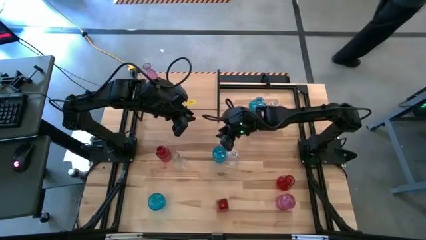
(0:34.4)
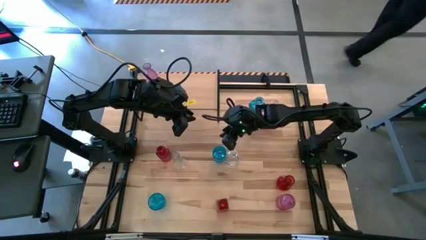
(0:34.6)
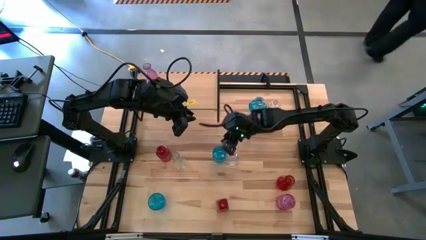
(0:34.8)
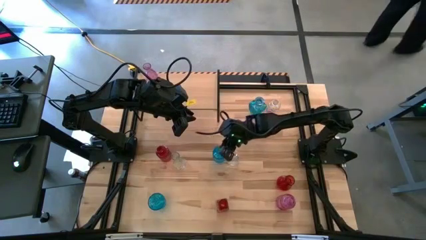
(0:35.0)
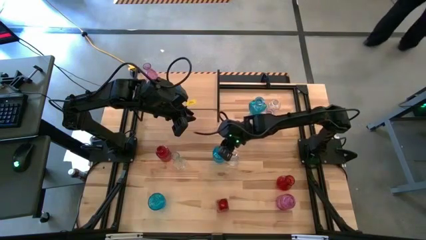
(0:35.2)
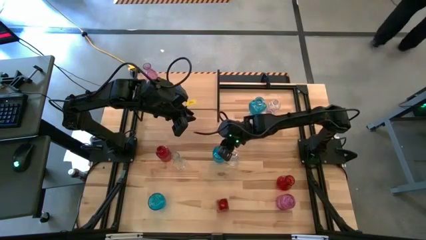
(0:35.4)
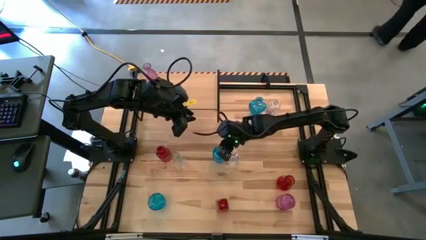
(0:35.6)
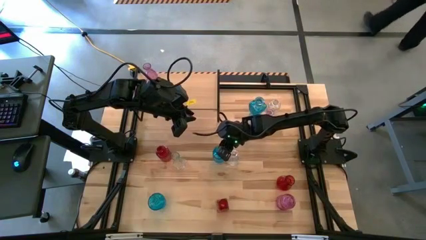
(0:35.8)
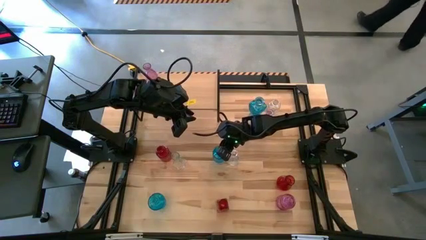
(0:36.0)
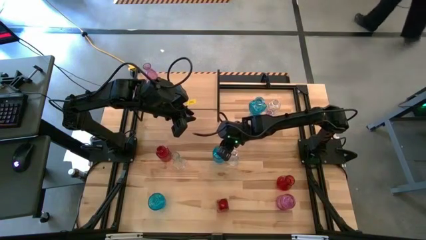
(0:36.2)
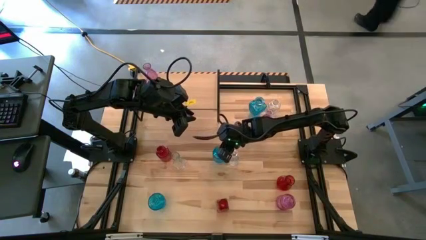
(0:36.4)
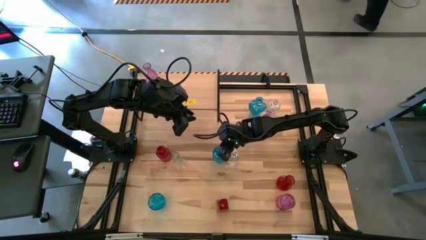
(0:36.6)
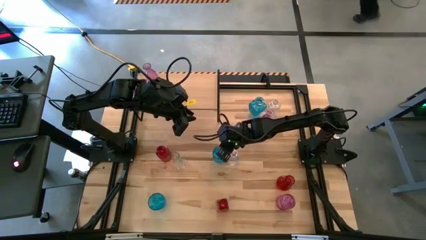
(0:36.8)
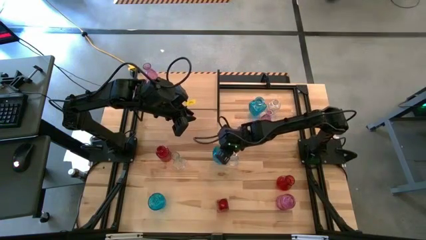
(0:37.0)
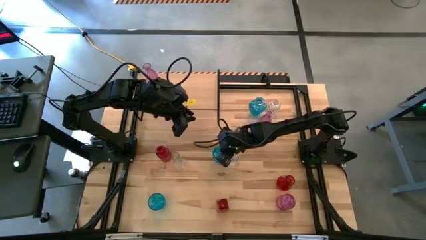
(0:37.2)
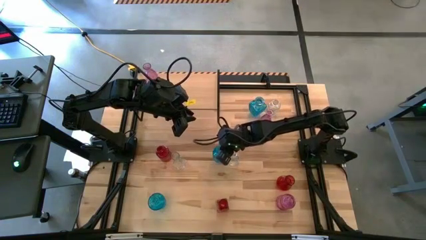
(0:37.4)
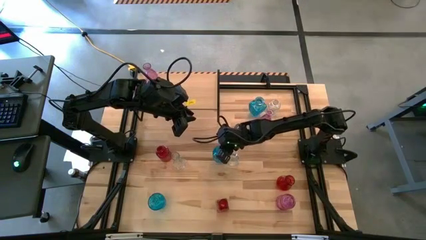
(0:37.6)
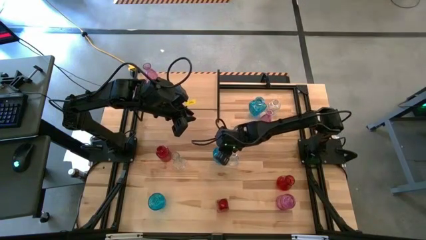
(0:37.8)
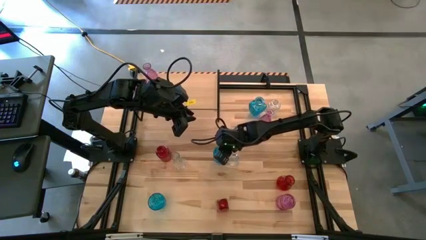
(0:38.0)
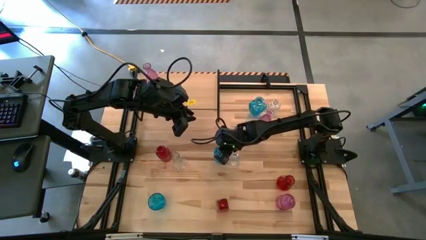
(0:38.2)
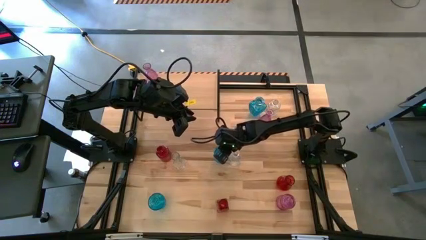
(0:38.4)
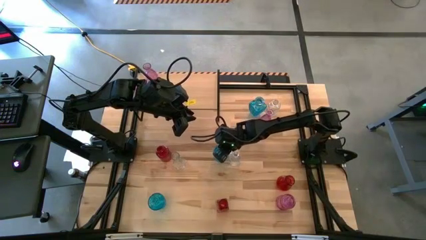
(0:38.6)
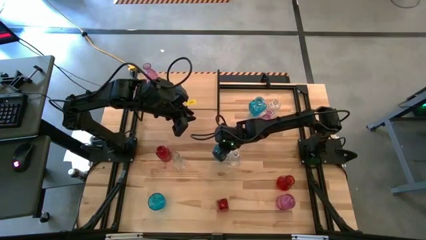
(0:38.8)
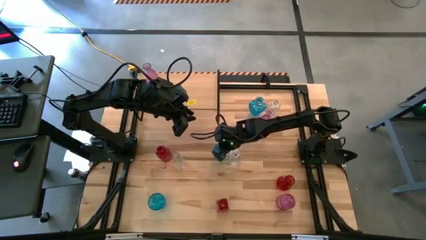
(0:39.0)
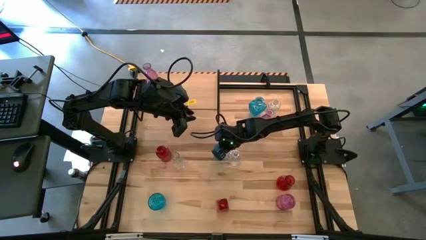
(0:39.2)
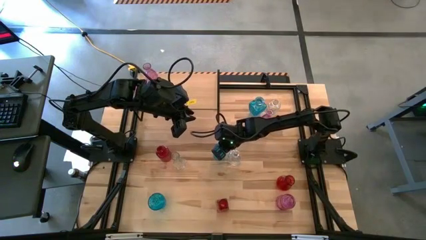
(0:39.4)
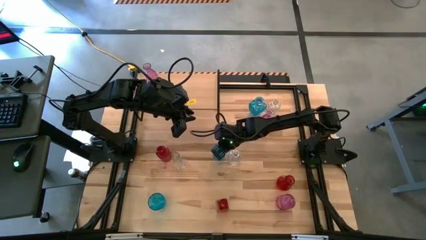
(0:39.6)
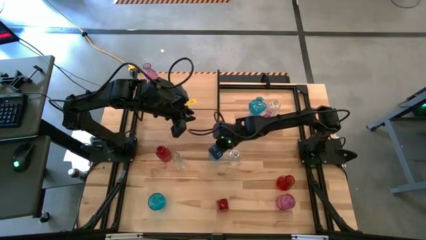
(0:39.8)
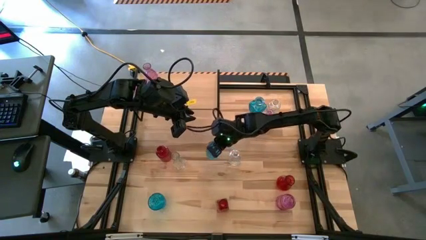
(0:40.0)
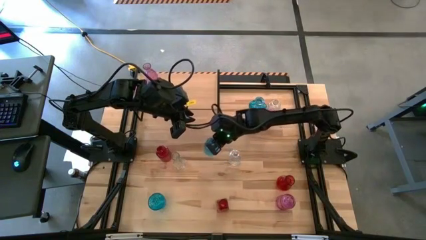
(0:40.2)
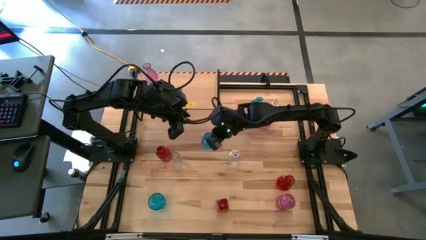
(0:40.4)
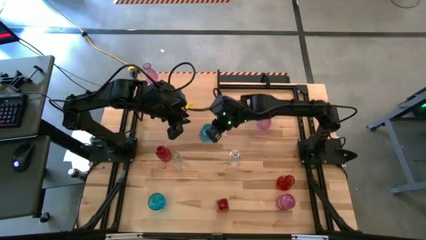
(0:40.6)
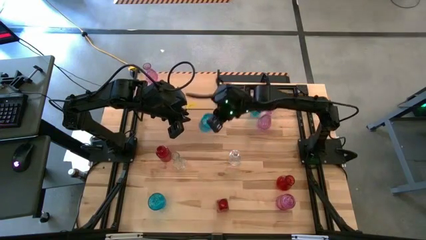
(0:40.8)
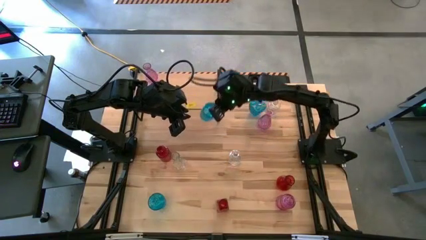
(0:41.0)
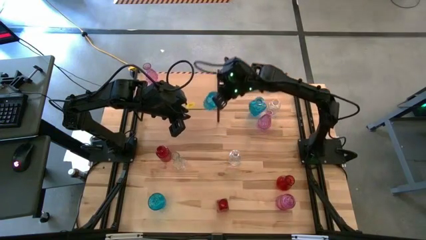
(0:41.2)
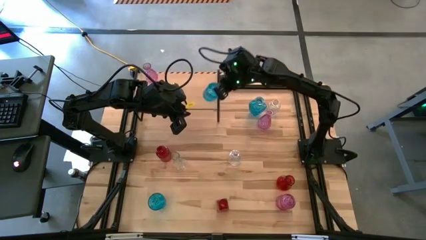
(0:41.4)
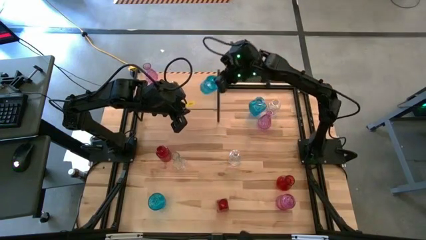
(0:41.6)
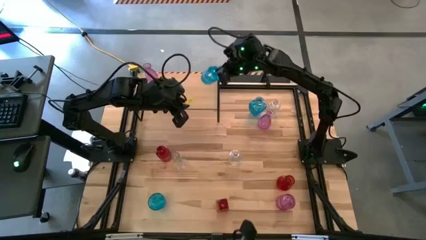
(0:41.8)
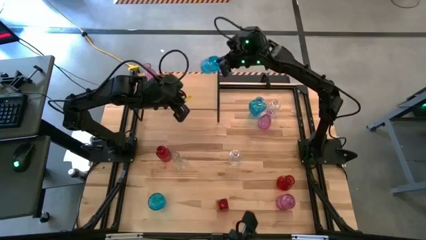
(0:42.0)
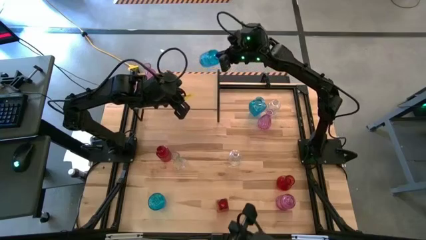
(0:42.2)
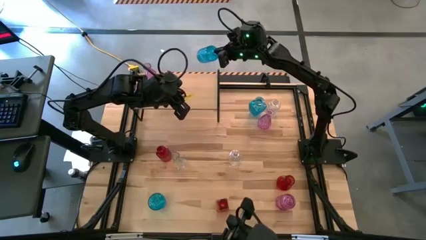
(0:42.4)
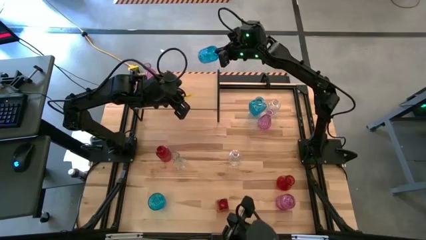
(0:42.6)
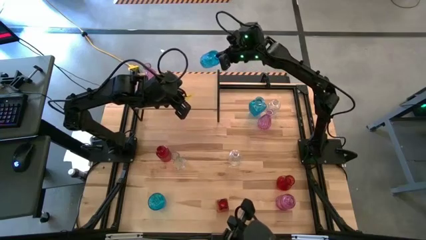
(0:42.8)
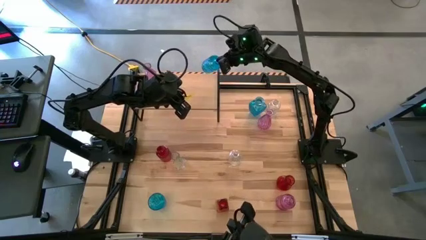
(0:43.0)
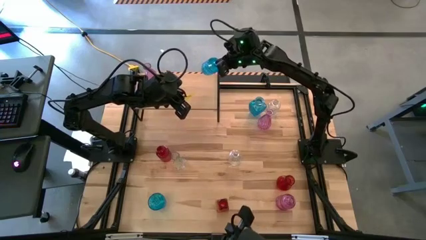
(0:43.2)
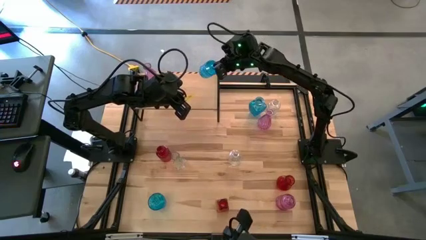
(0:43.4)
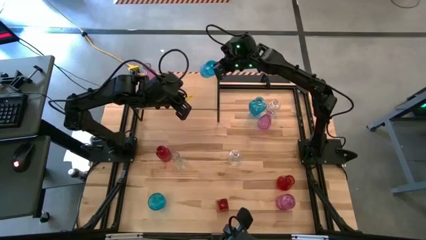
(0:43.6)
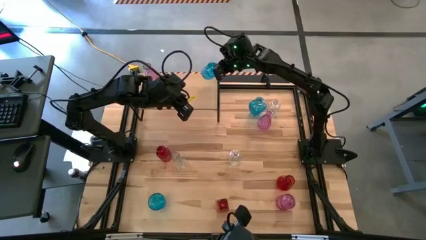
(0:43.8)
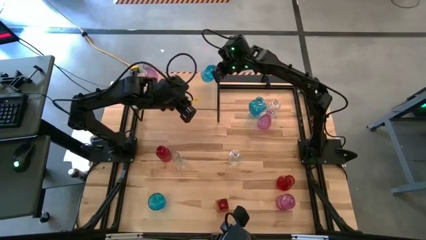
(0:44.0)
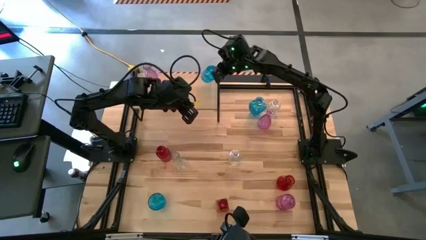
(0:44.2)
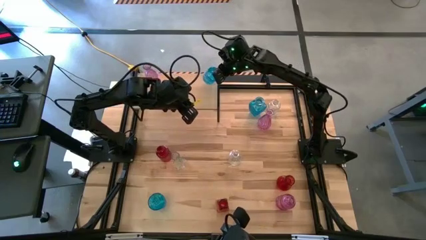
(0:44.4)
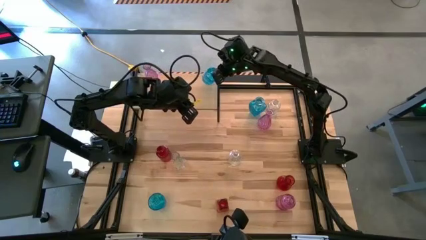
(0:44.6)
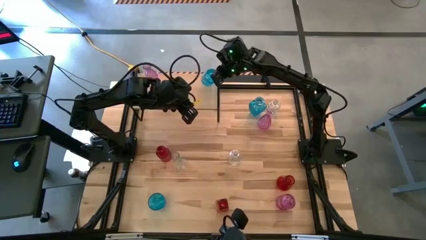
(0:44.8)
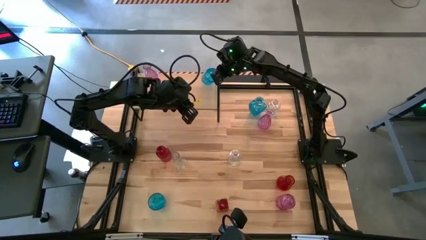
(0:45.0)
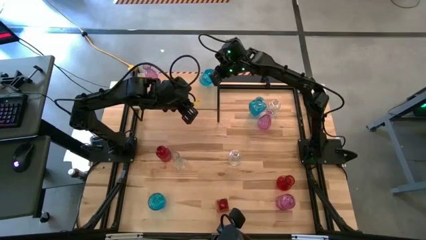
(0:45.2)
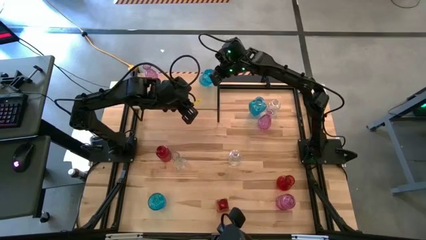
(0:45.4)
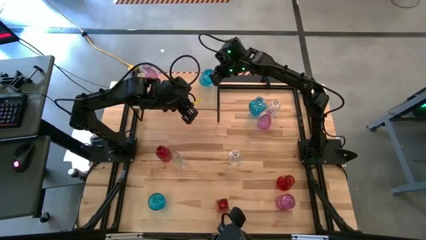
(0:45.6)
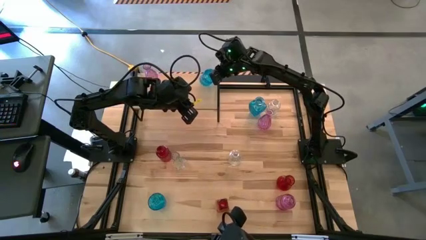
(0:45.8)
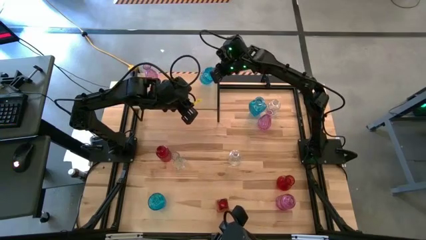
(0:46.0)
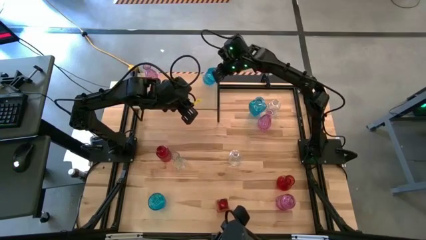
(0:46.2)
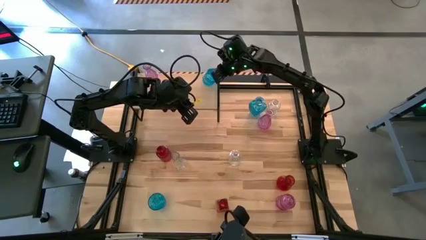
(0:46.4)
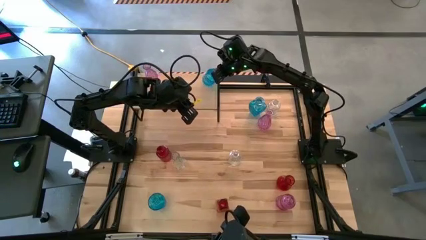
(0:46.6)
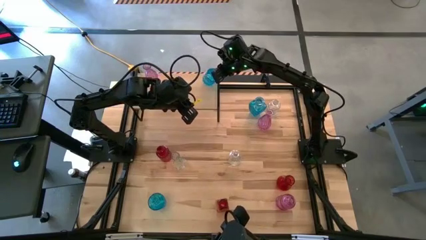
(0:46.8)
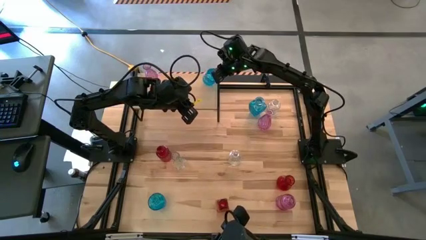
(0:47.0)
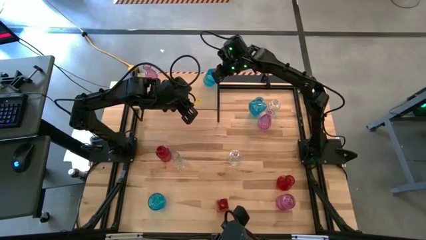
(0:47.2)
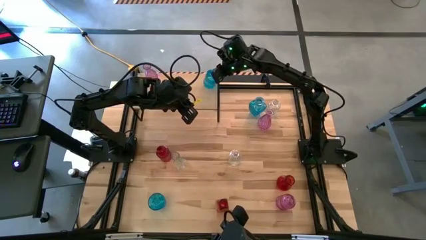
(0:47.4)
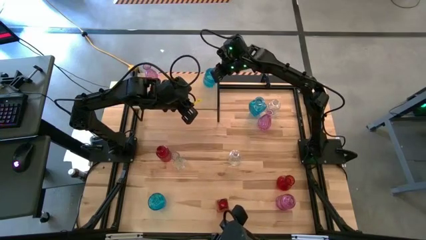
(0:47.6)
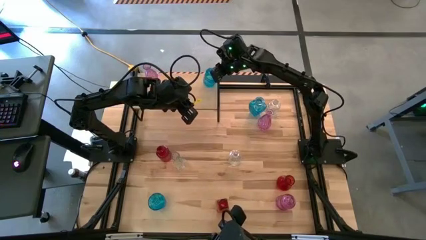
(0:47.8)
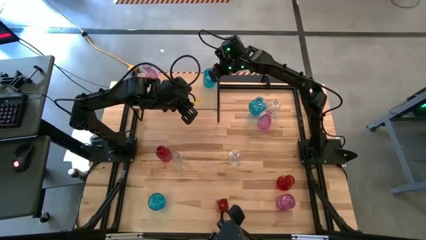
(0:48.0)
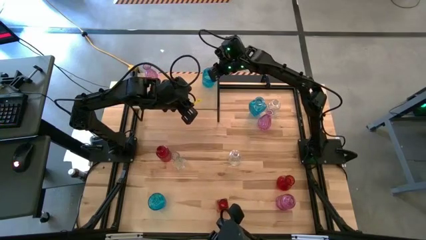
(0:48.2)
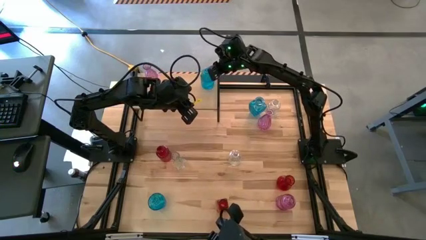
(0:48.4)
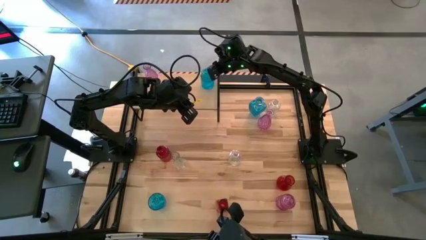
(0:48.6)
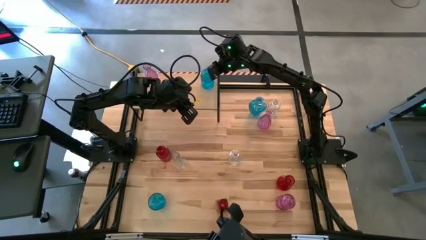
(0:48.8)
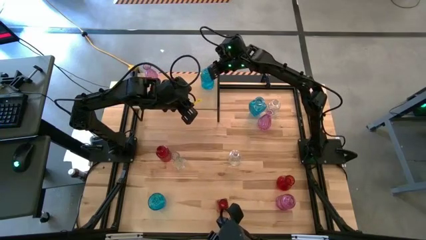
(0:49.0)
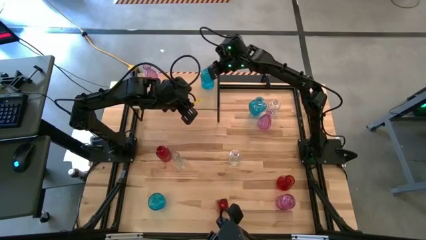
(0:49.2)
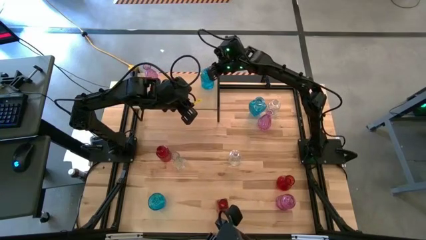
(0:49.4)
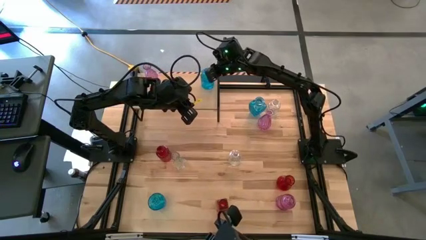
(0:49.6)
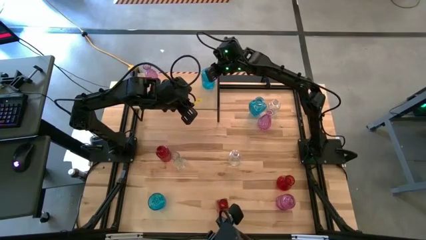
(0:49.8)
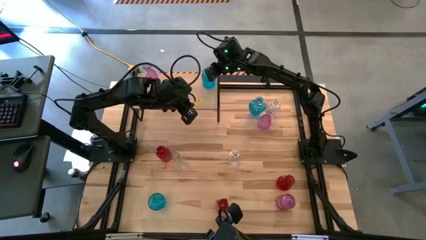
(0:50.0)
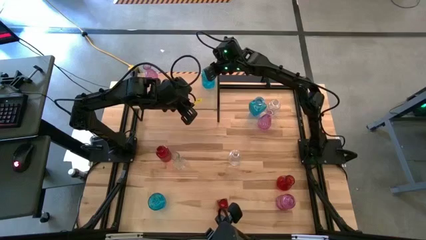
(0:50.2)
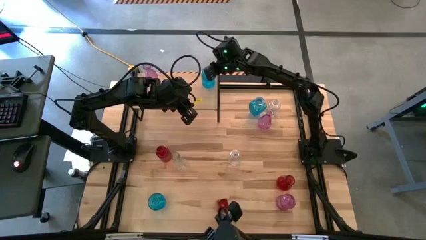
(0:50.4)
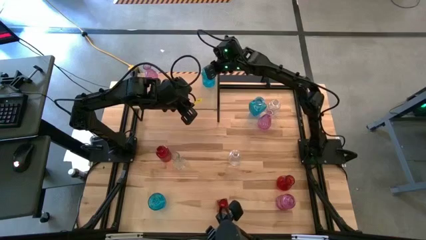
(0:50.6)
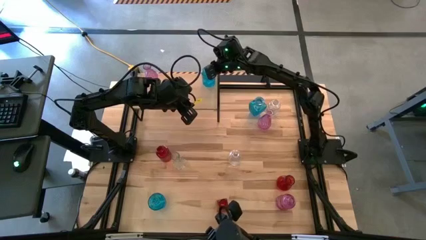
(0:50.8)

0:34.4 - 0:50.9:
Task: sort vases onto shelf
Put the center blue vase on the shelf

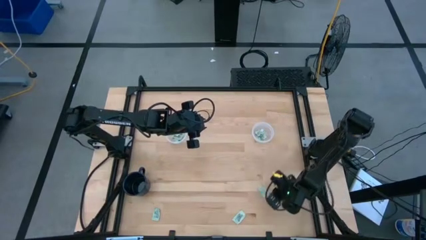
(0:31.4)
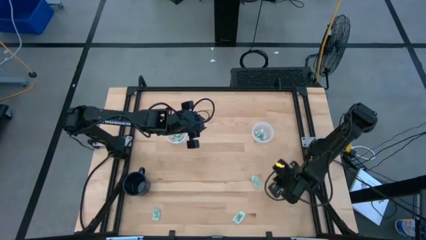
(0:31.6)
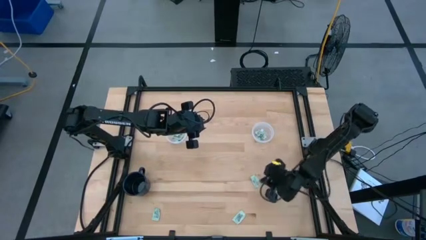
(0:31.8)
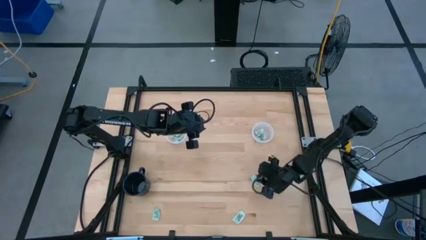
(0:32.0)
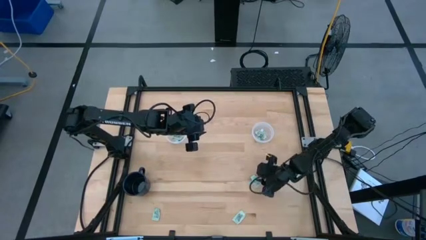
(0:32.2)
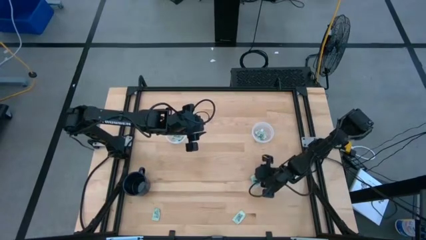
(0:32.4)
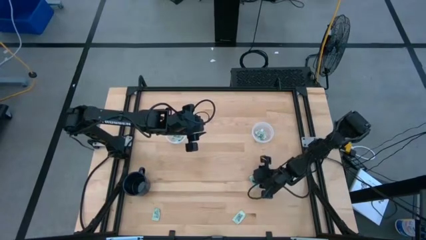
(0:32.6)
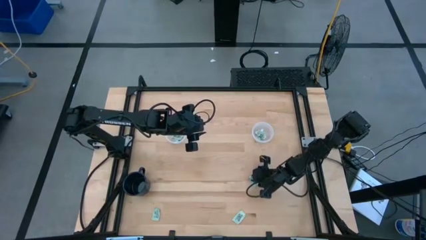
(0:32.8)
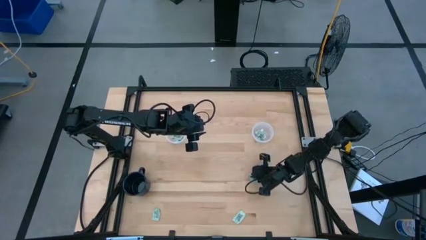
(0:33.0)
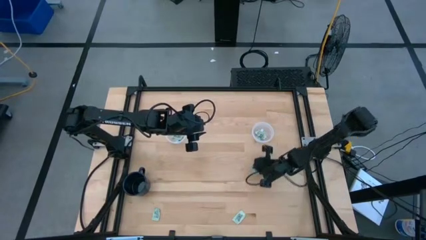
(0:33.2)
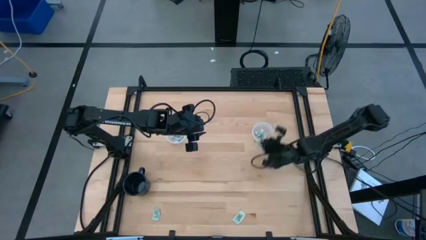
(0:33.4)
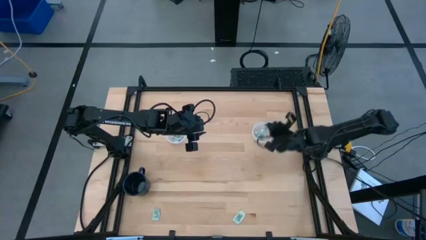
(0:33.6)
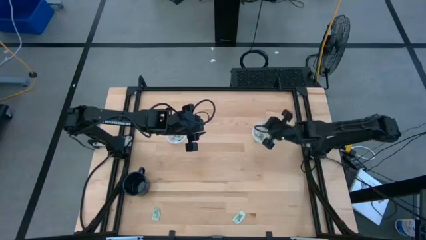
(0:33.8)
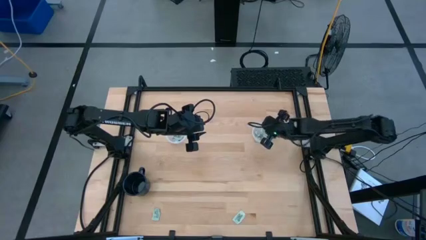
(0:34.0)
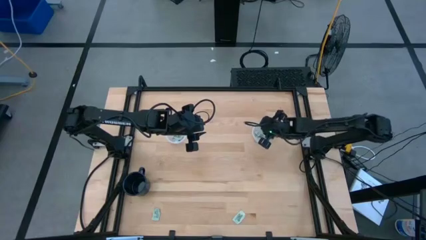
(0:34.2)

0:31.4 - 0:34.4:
Task: Pick and place Stevia / Truvia into bins
Put the stevia packet into the right transparent container
